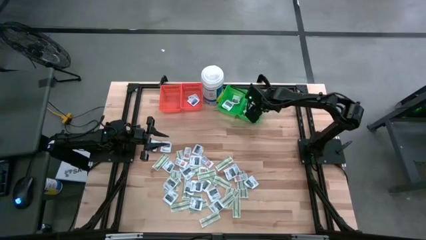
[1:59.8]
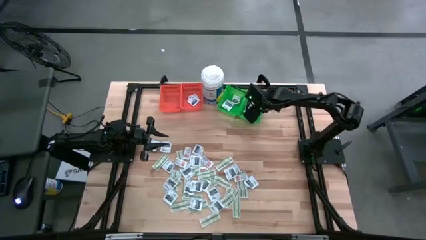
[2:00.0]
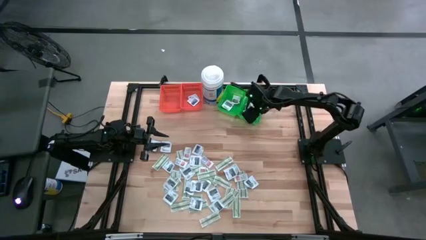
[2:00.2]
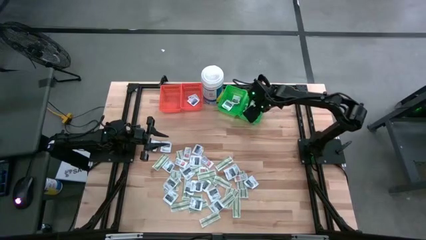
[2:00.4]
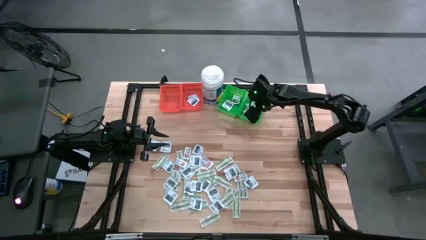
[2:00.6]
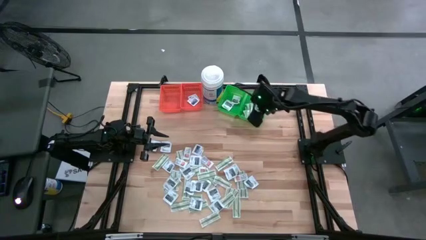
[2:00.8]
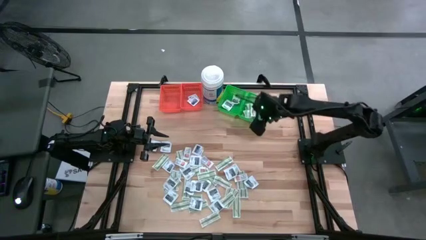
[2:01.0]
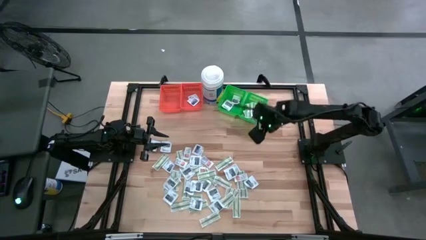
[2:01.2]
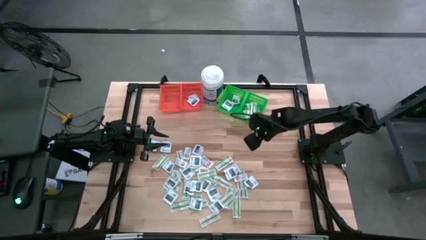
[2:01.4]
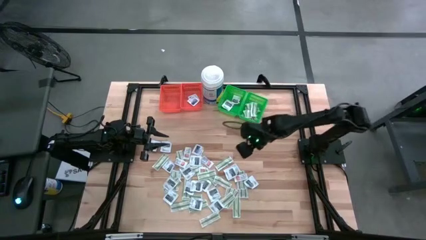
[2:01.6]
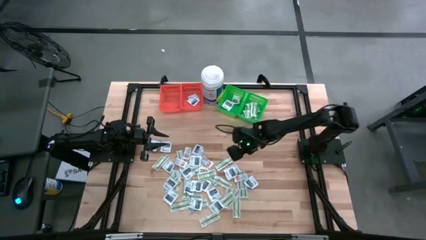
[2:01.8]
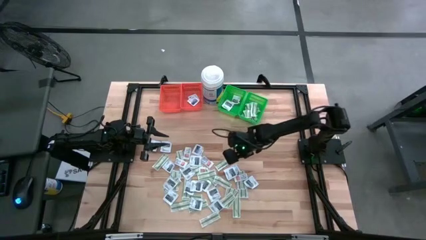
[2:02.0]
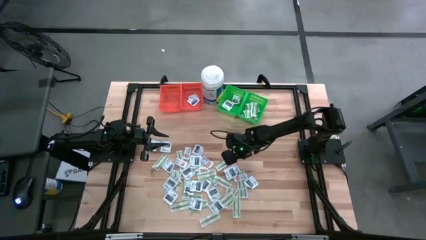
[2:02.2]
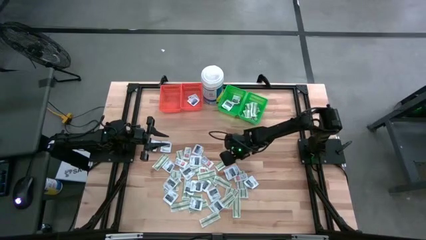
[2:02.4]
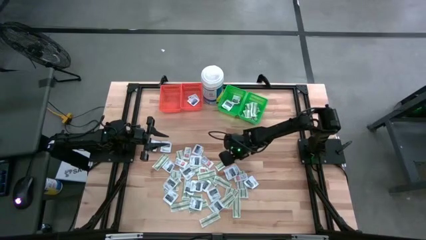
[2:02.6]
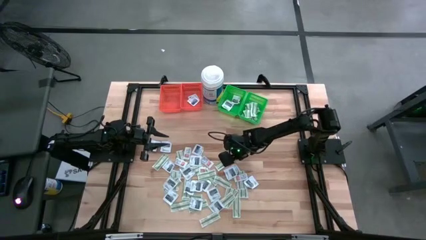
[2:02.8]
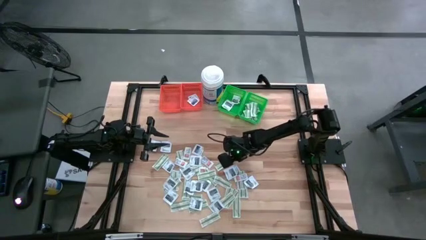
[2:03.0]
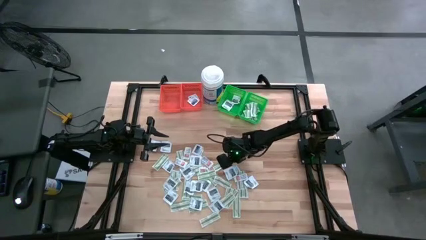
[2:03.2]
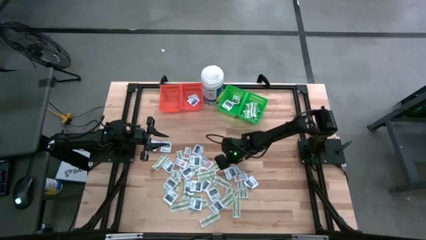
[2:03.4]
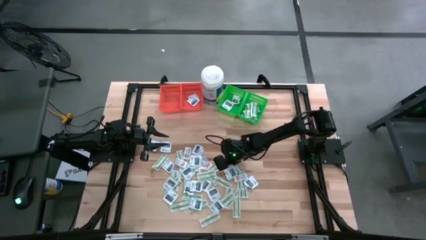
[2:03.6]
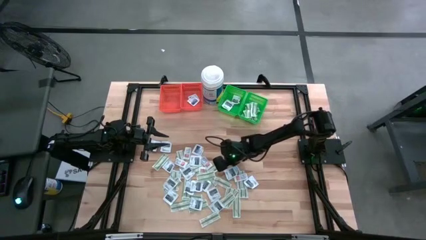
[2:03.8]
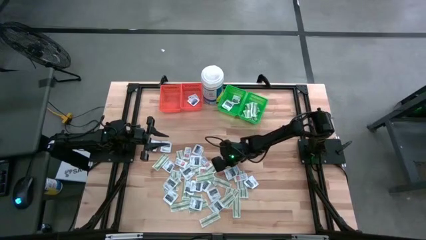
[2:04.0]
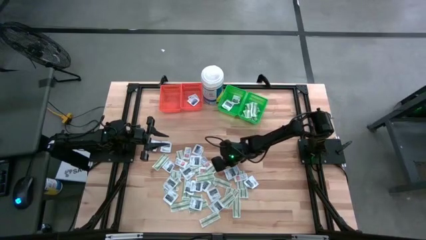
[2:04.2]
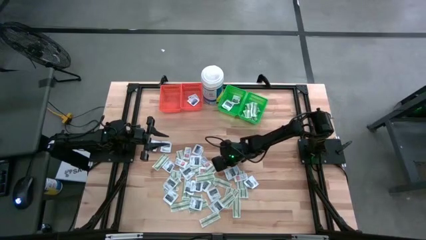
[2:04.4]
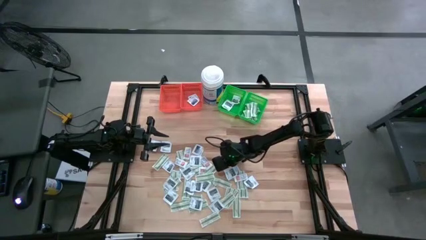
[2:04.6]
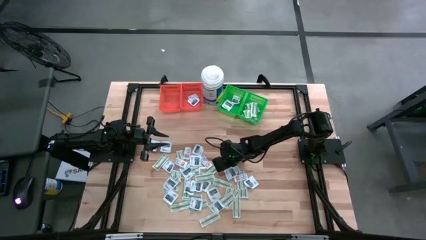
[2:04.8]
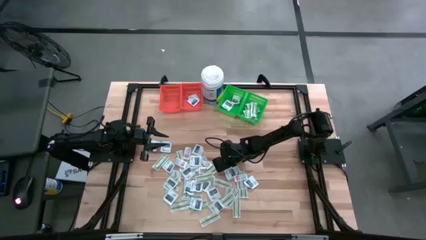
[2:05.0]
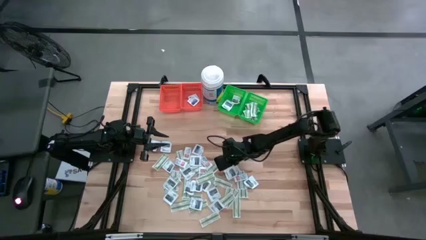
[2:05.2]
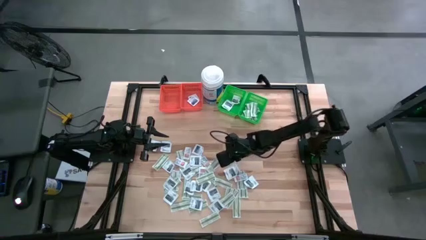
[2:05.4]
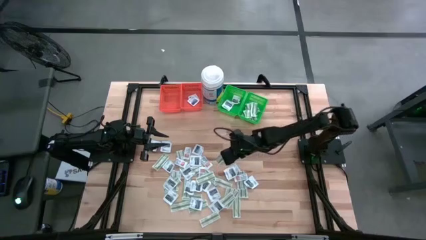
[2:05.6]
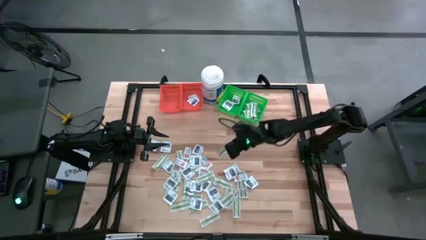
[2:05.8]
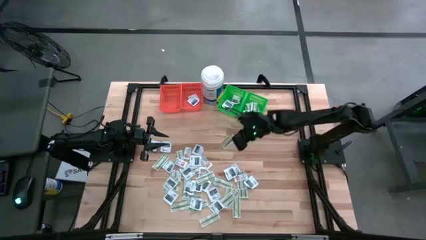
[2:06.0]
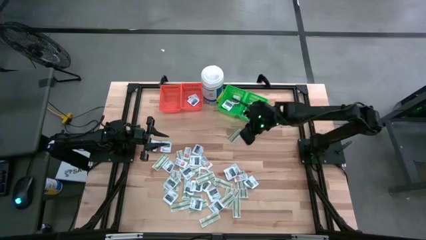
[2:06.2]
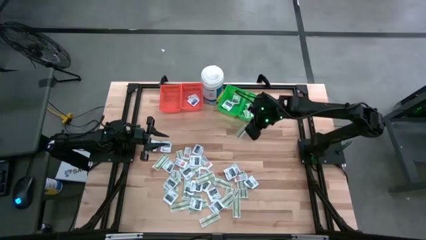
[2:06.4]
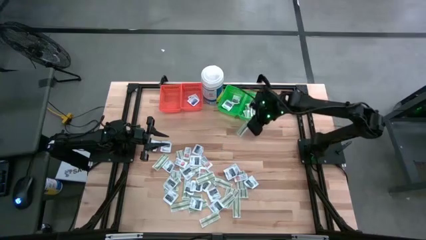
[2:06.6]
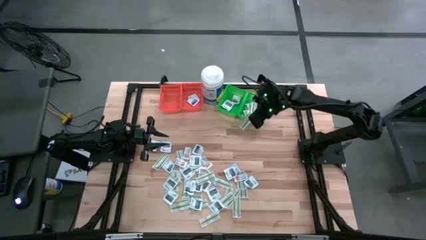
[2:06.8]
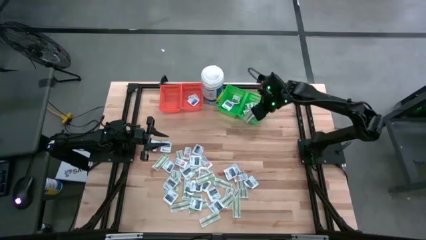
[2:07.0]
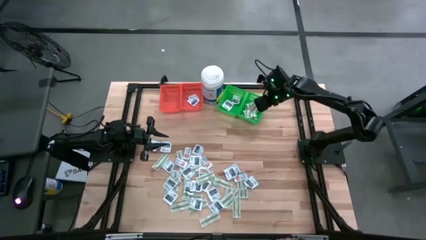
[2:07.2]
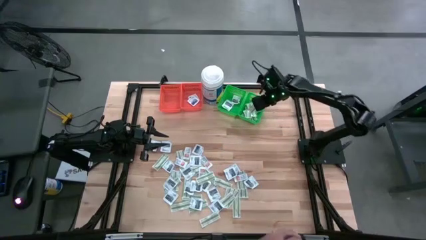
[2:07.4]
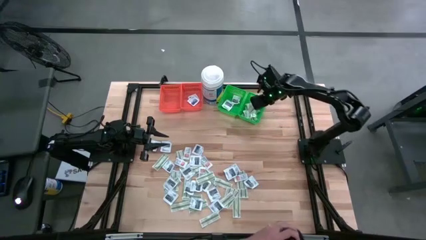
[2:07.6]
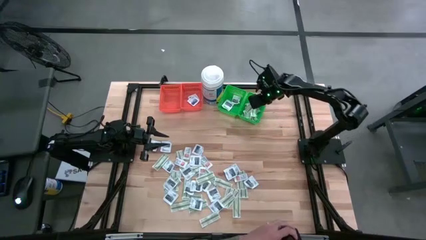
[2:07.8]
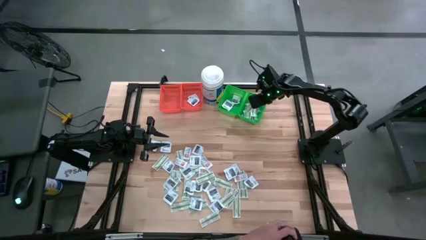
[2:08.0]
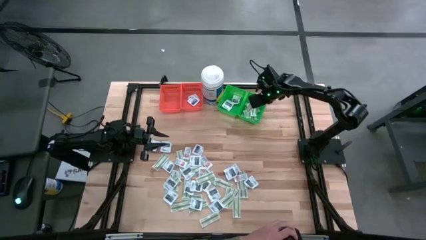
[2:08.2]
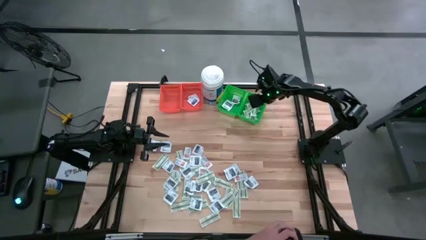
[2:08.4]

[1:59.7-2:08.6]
Task: Pick & Place First Aid Supplies
Put the green bandage pack into the right green bin

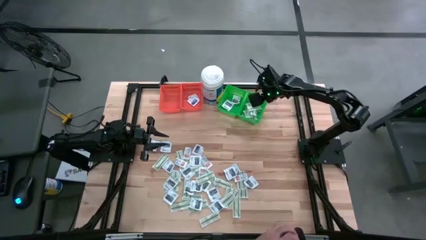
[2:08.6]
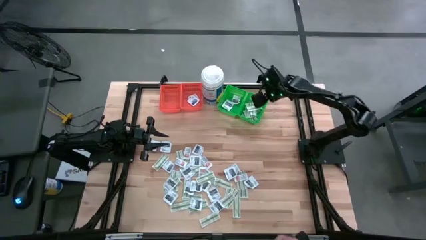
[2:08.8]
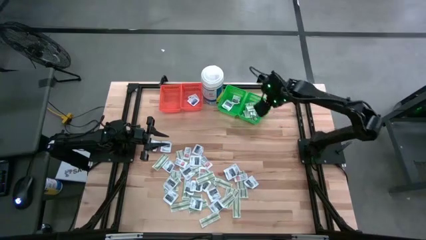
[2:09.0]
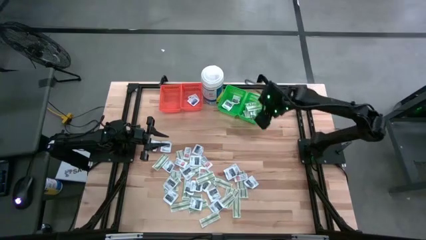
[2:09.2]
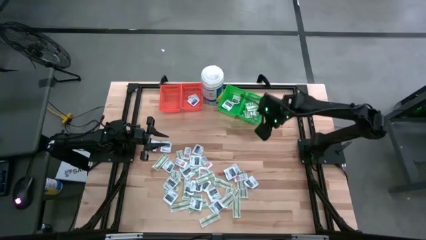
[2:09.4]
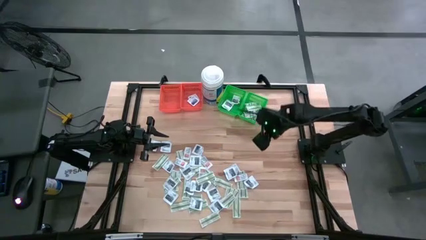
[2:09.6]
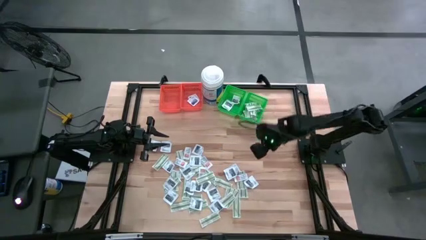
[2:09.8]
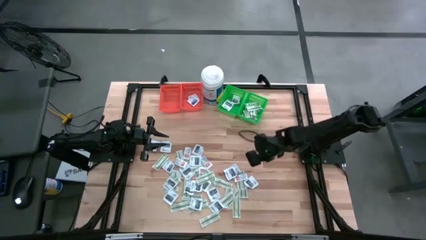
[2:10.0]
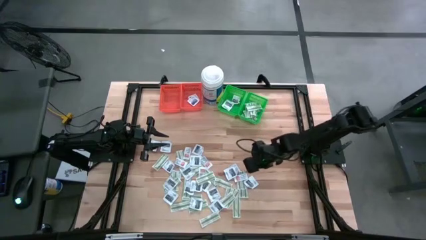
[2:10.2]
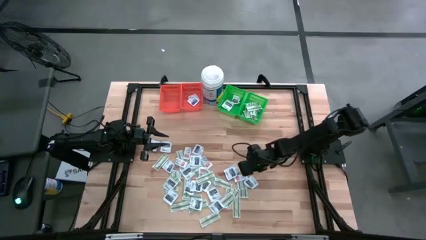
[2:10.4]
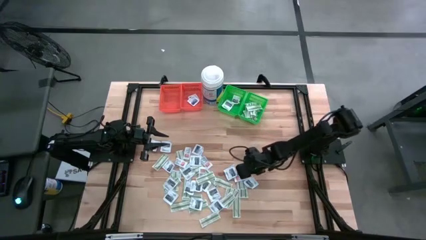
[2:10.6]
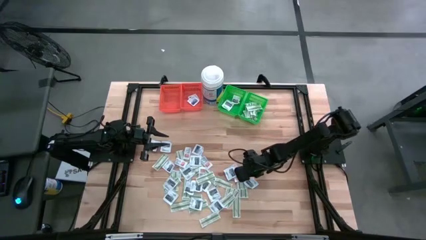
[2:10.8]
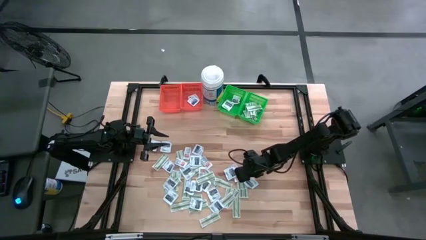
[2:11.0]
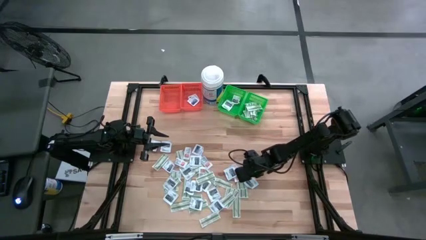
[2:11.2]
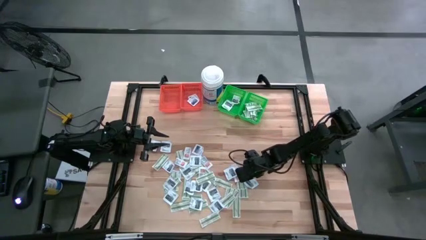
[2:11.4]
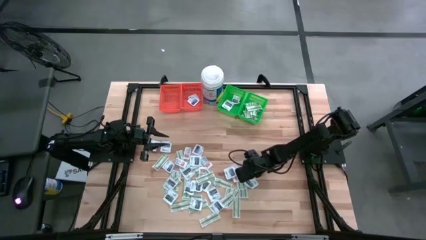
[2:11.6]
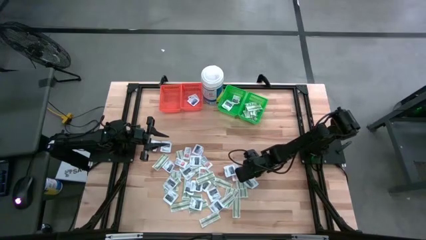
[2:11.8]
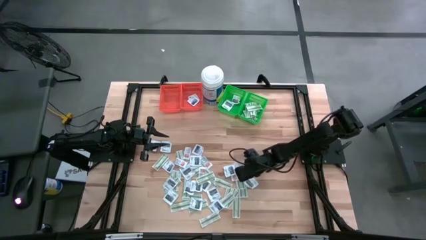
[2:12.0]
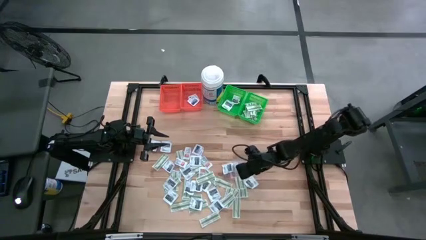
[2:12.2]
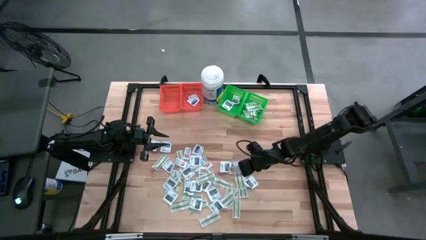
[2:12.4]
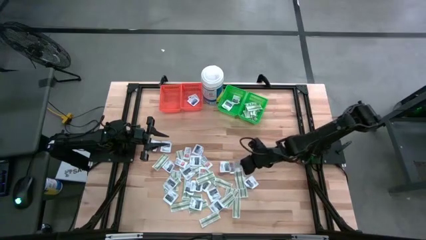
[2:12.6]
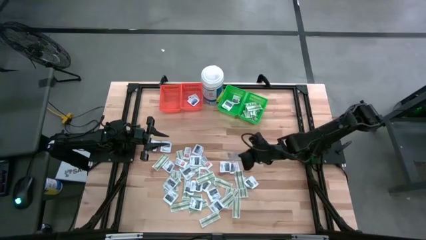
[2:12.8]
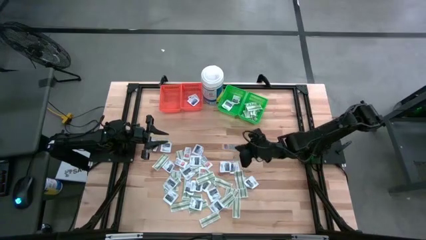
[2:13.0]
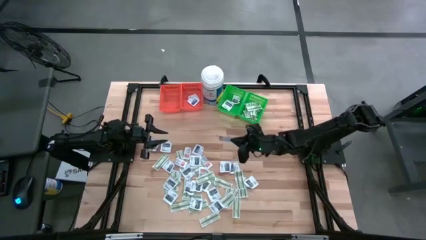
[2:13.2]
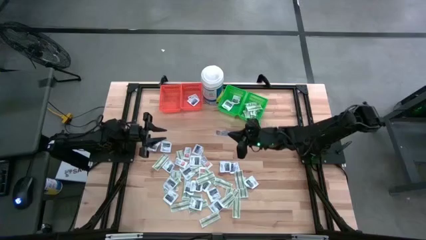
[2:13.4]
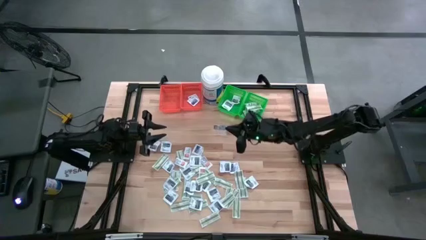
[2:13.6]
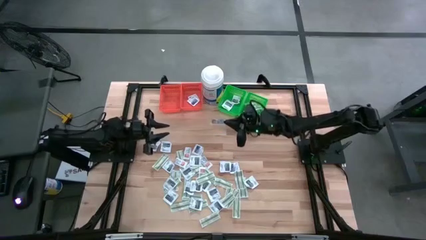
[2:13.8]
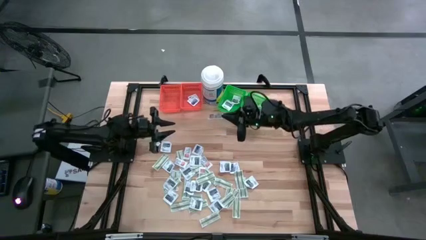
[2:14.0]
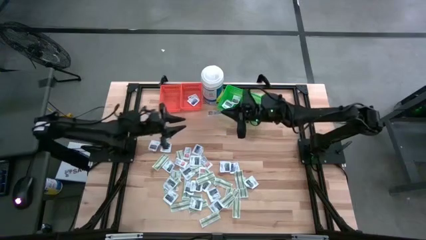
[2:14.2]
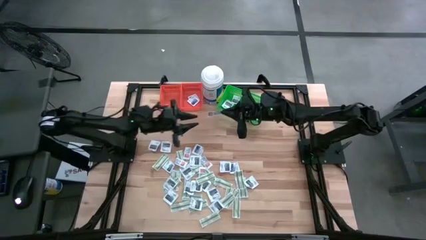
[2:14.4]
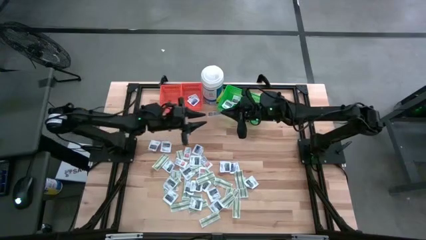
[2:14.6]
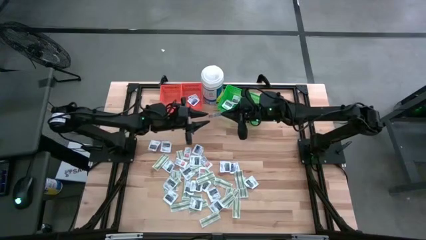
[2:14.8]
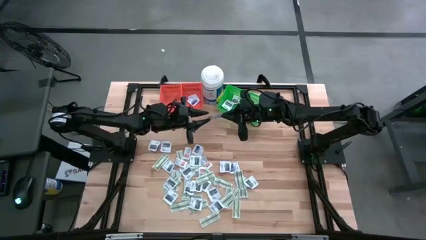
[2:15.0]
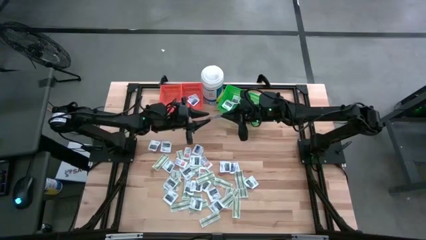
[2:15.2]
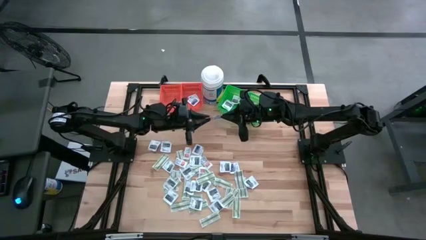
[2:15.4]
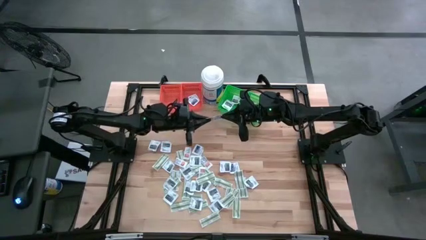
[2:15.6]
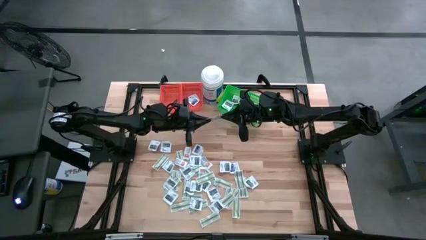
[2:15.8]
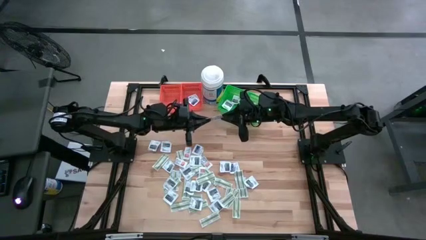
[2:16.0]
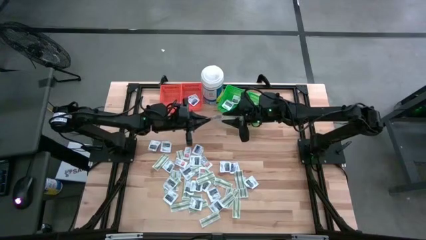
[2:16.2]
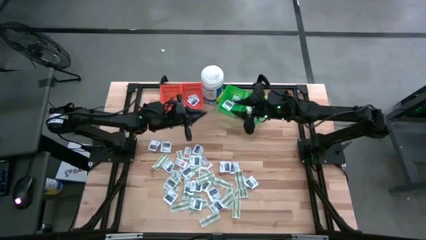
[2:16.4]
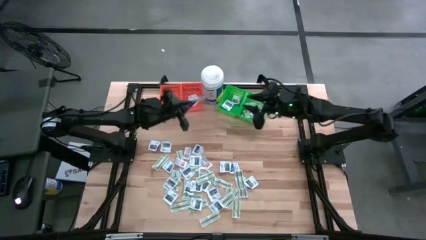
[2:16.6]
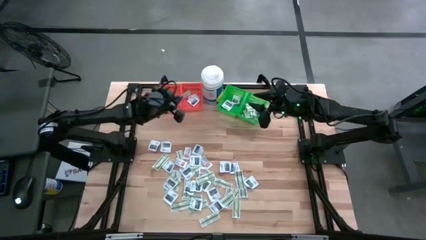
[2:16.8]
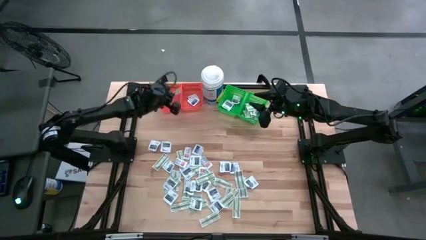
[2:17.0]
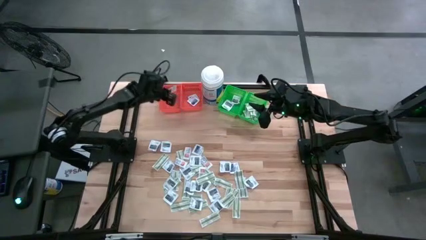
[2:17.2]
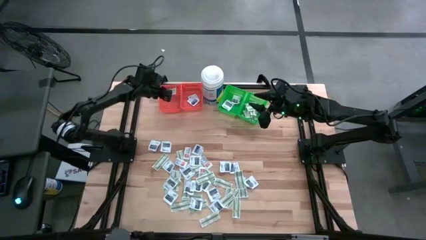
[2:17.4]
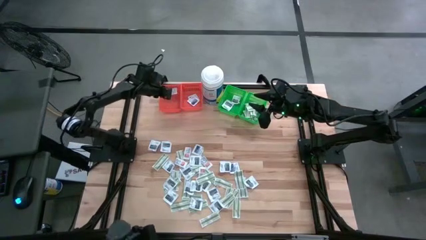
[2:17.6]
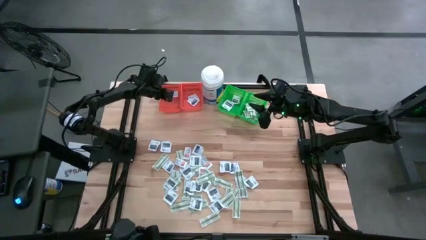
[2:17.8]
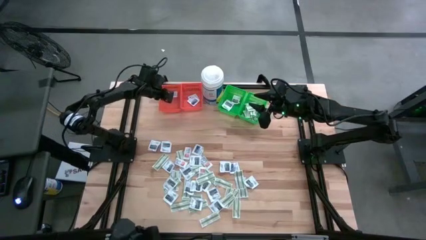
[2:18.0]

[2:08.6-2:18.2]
Put the orange ointment pack into the left orange bin
